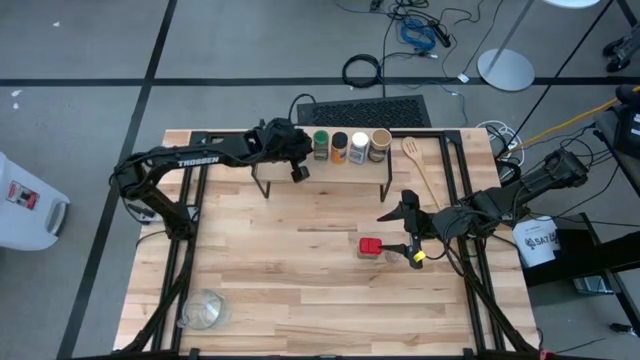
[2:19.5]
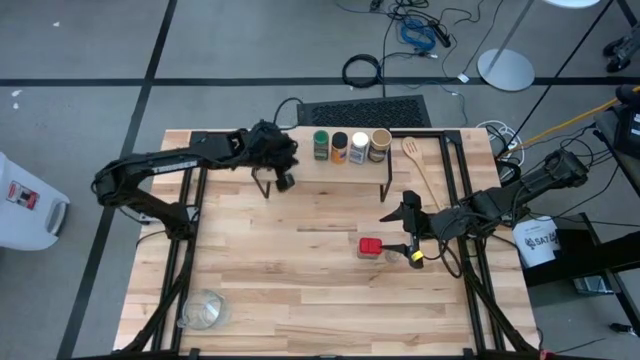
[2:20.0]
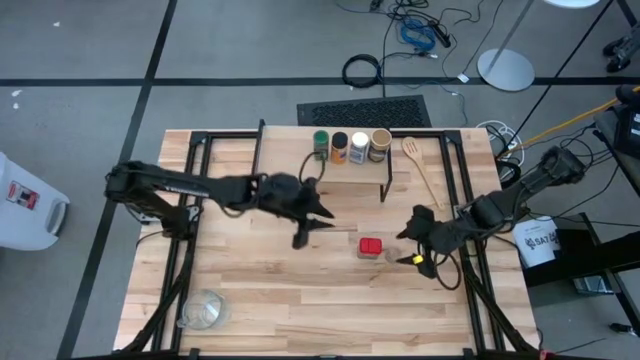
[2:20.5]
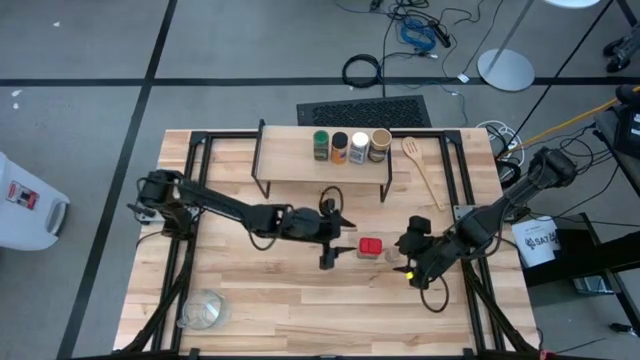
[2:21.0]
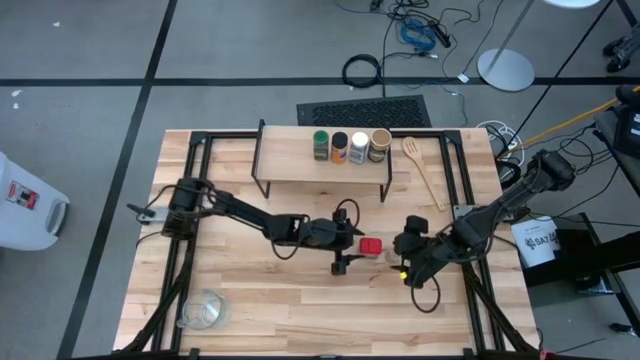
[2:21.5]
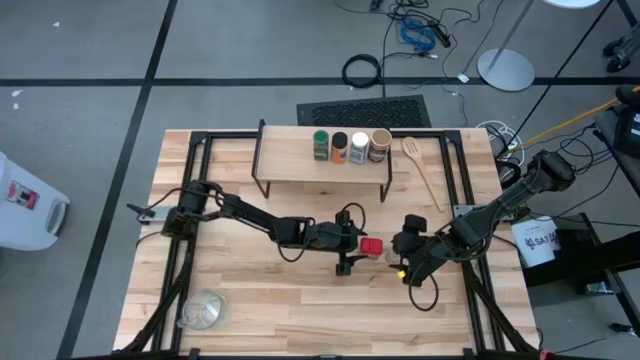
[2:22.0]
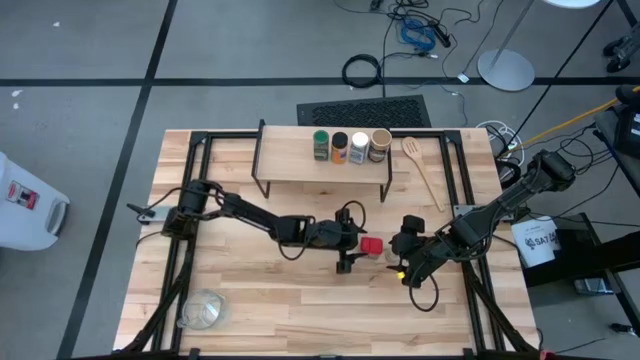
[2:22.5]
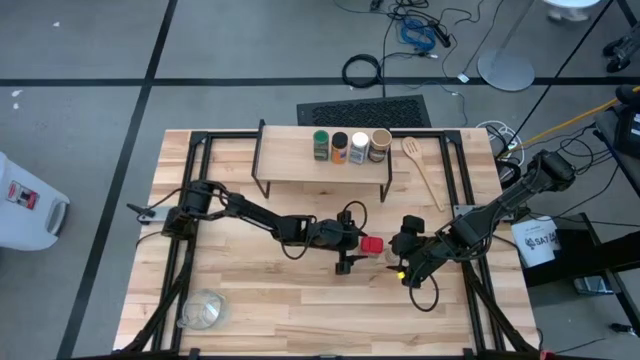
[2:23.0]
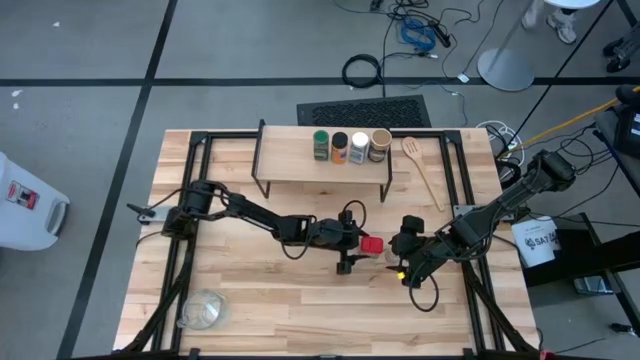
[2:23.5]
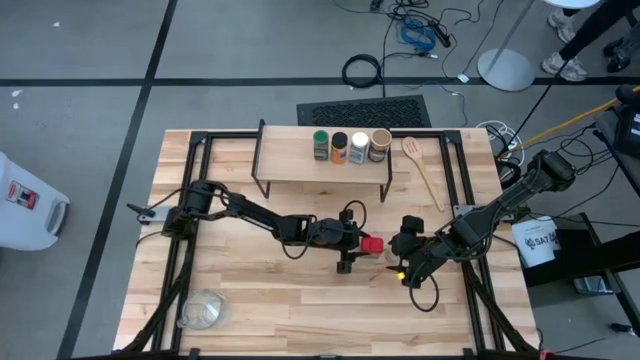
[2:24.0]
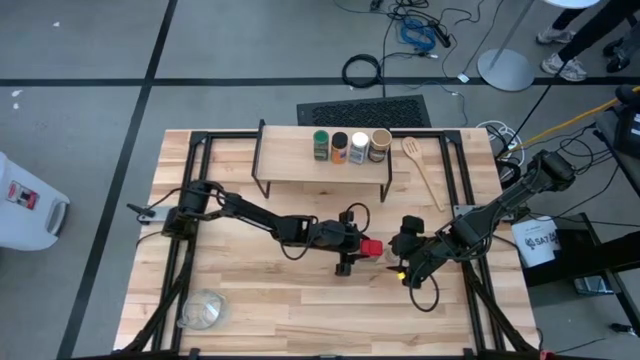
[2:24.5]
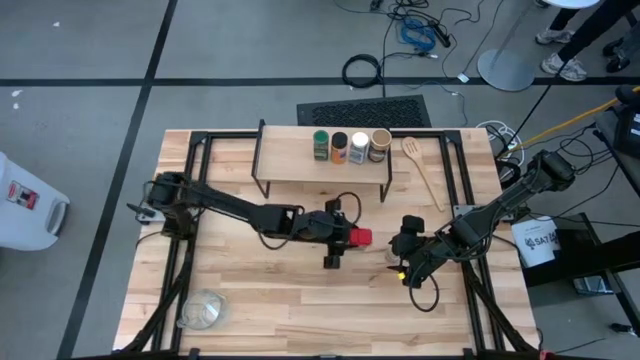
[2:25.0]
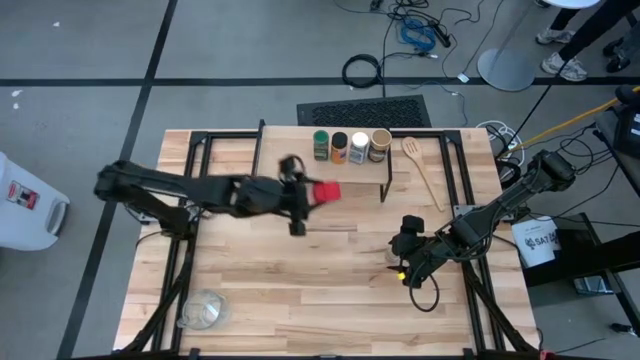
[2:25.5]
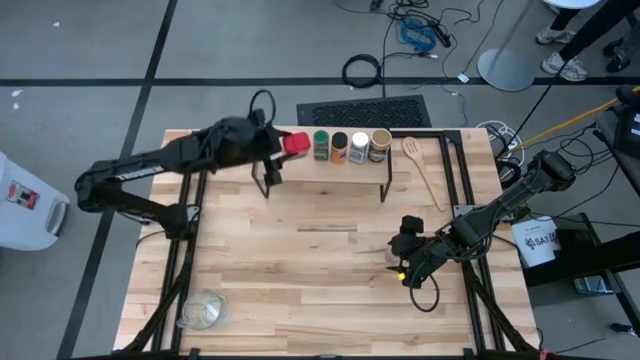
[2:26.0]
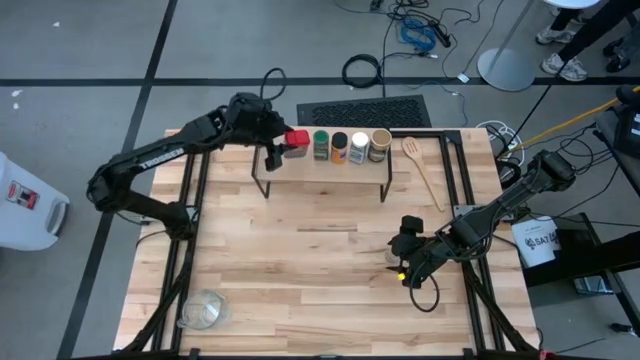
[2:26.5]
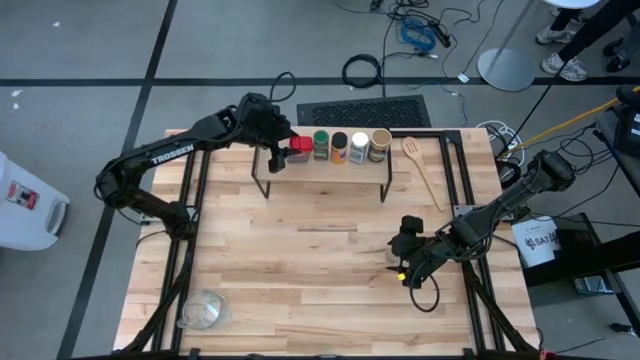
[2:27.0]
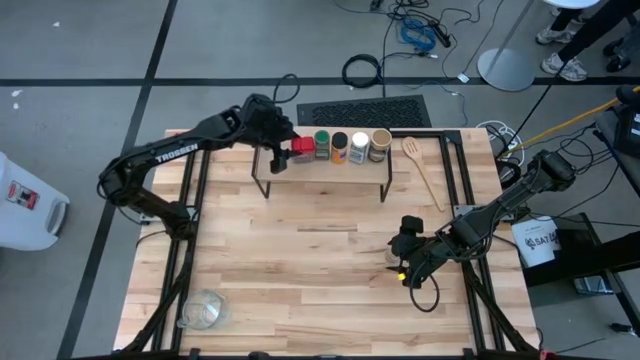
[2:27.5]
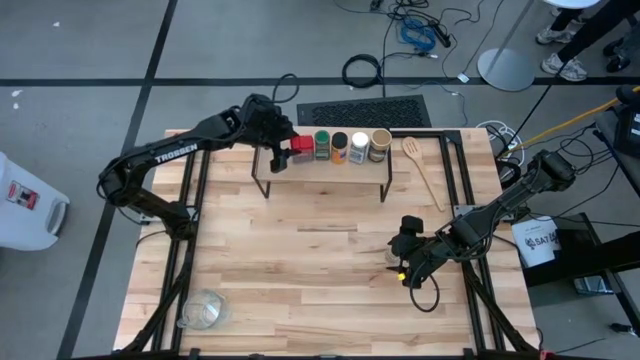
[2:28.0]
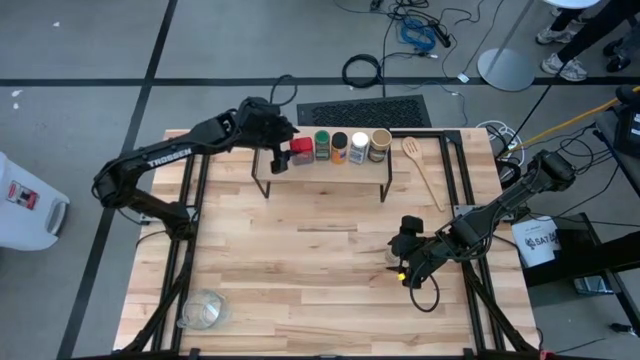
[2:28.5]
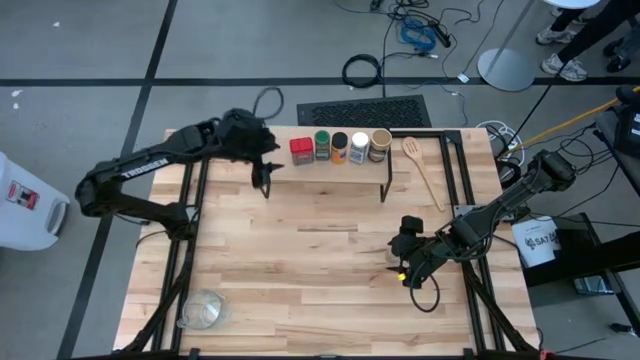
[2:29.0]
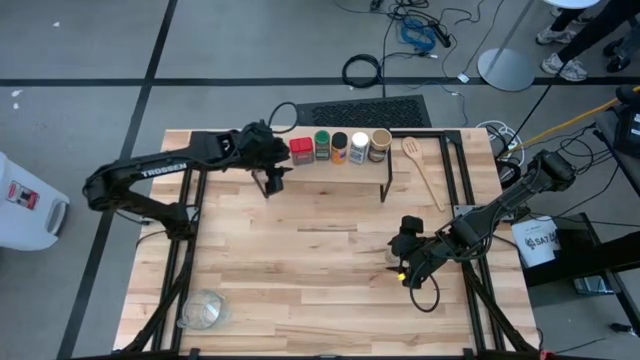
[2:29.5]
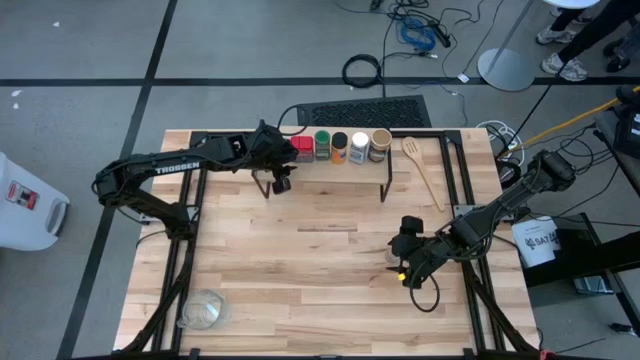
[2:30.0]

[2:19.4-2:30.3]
Task: Shelf spices
Put the red seasoning can on the shelf

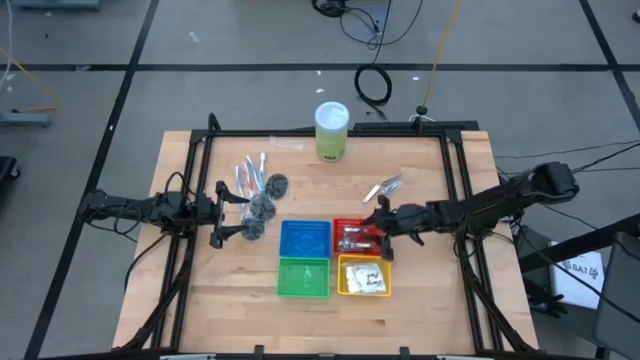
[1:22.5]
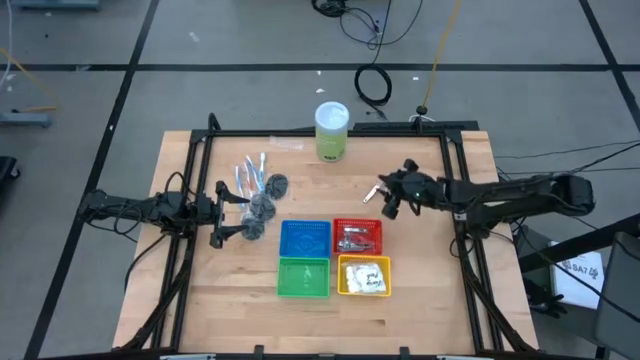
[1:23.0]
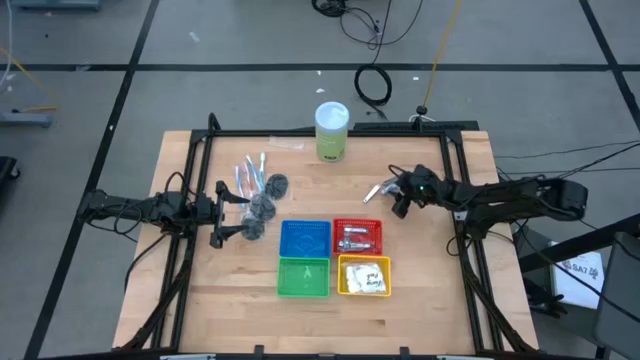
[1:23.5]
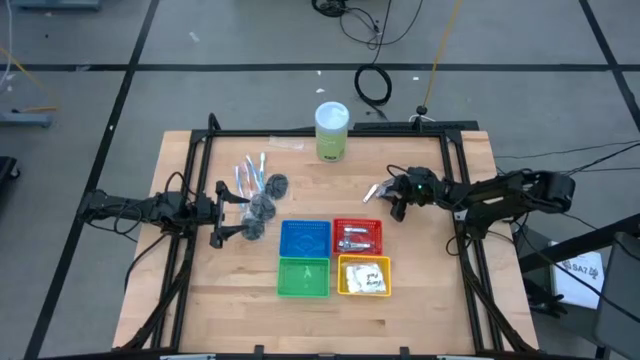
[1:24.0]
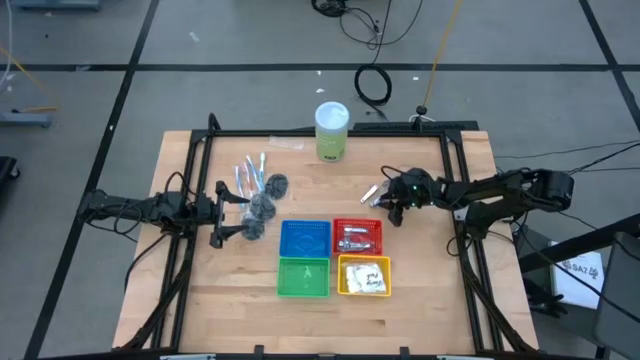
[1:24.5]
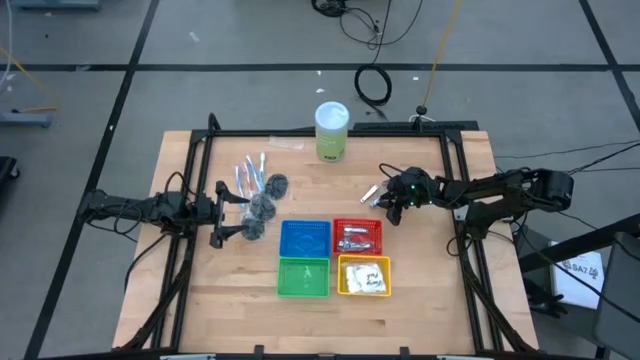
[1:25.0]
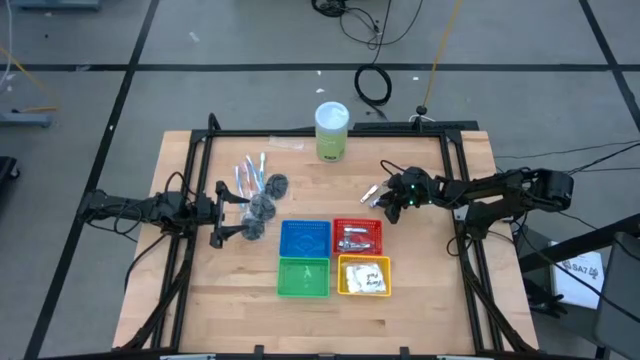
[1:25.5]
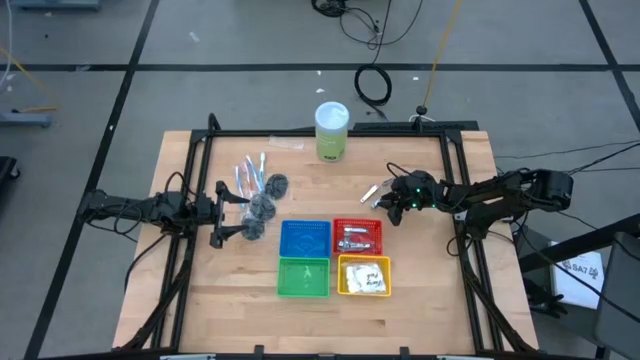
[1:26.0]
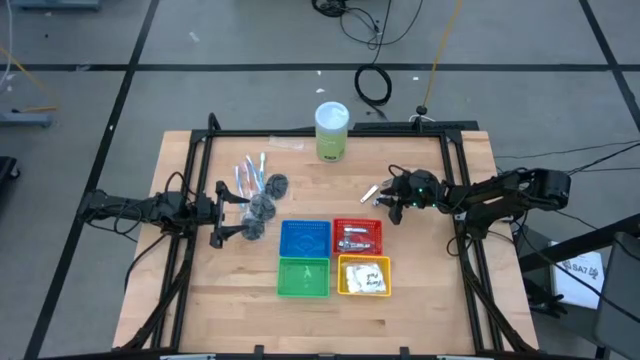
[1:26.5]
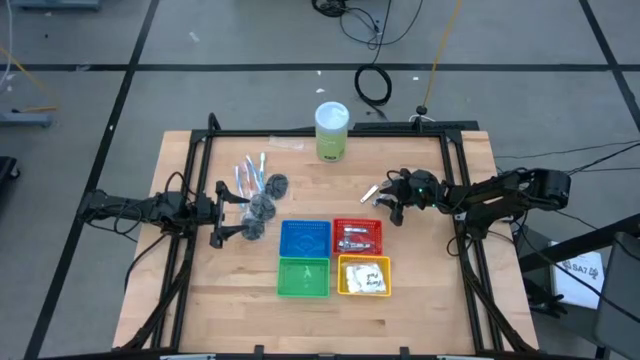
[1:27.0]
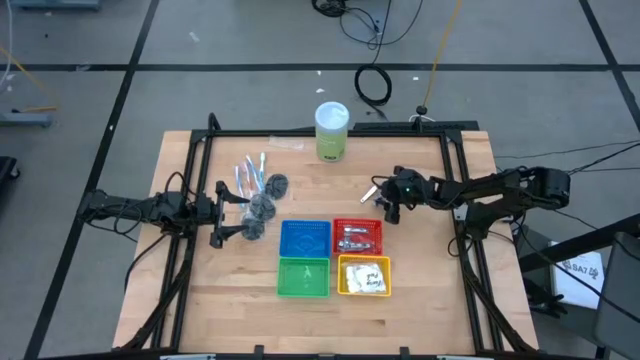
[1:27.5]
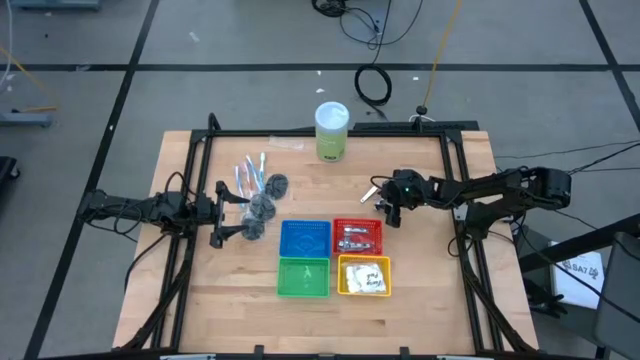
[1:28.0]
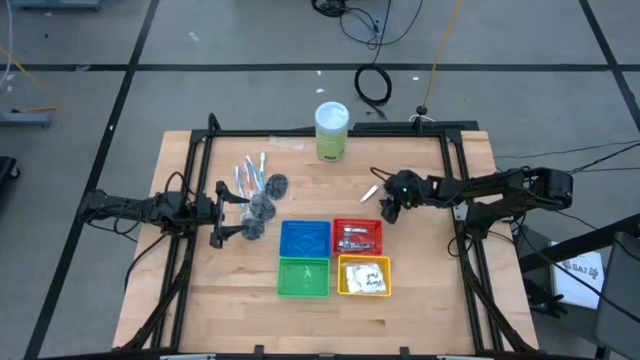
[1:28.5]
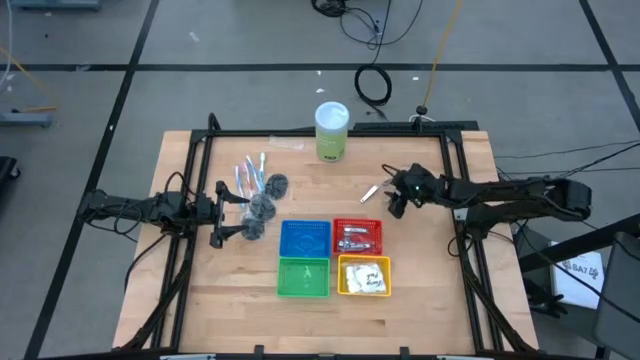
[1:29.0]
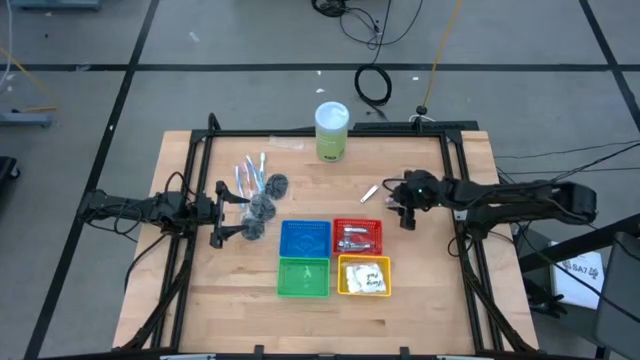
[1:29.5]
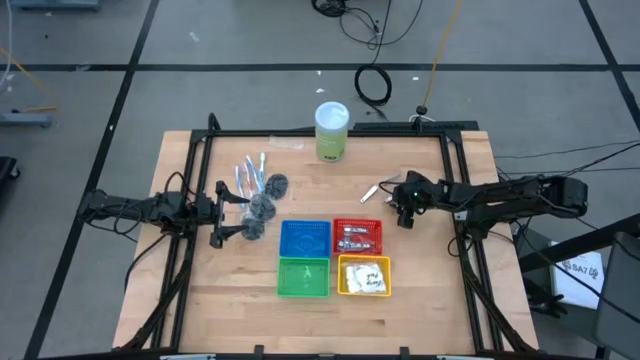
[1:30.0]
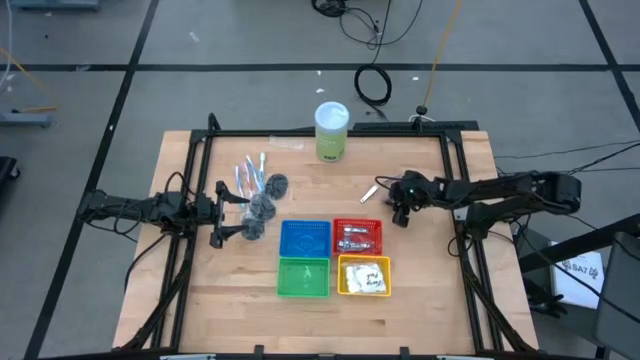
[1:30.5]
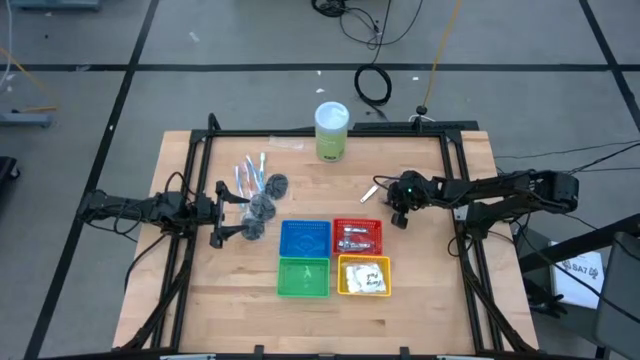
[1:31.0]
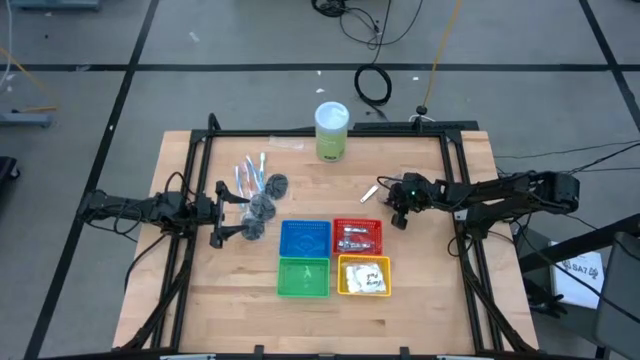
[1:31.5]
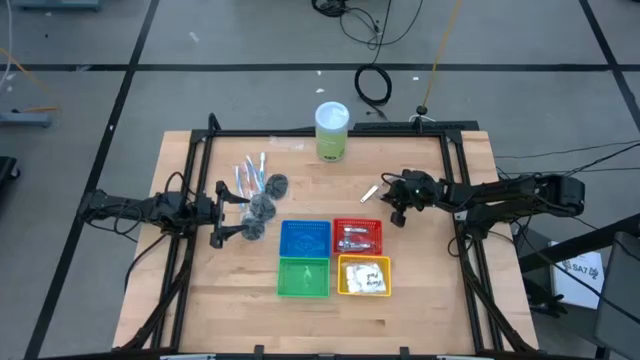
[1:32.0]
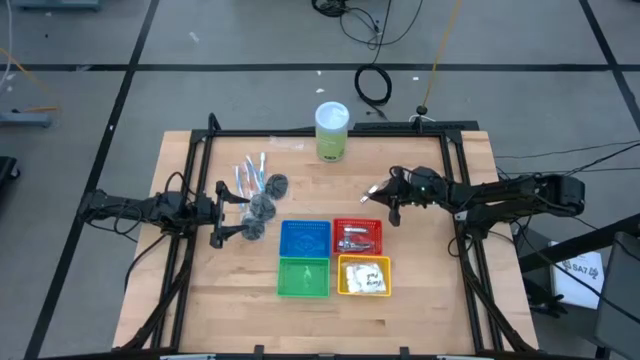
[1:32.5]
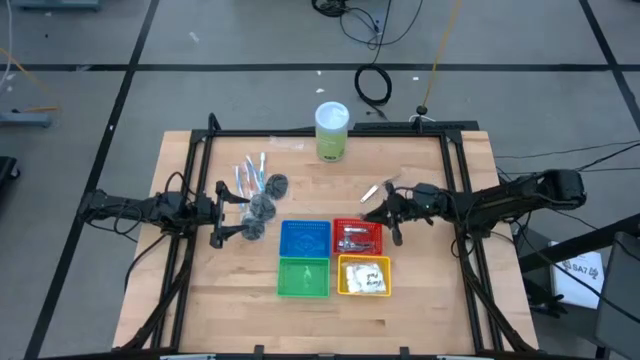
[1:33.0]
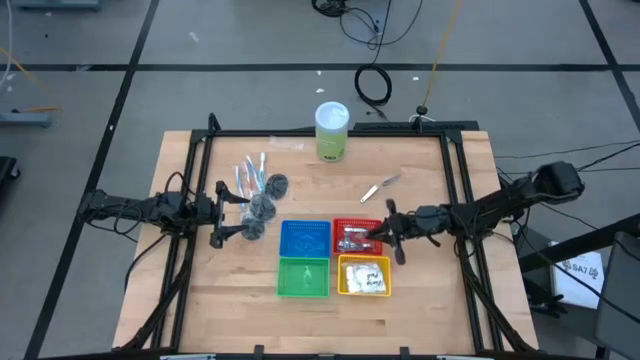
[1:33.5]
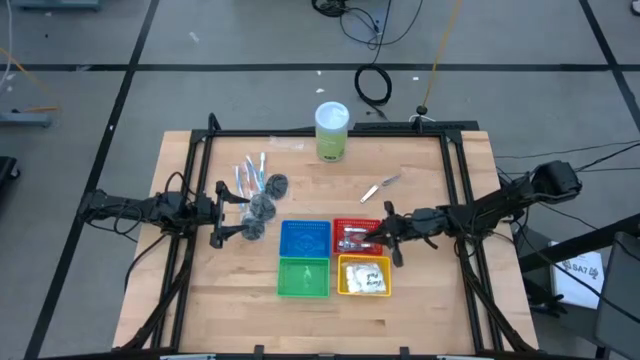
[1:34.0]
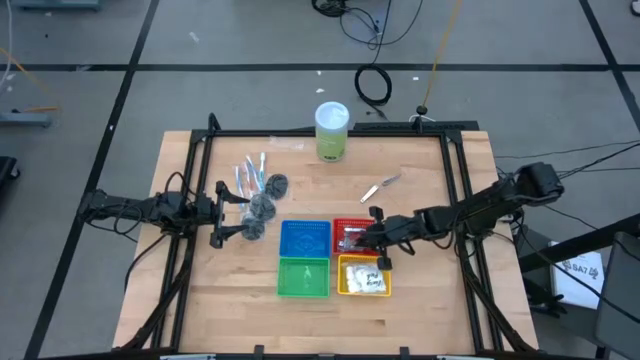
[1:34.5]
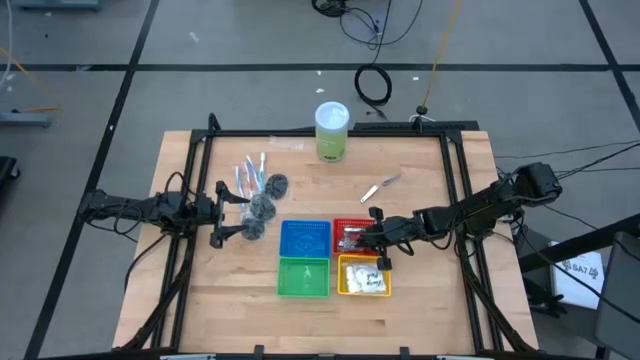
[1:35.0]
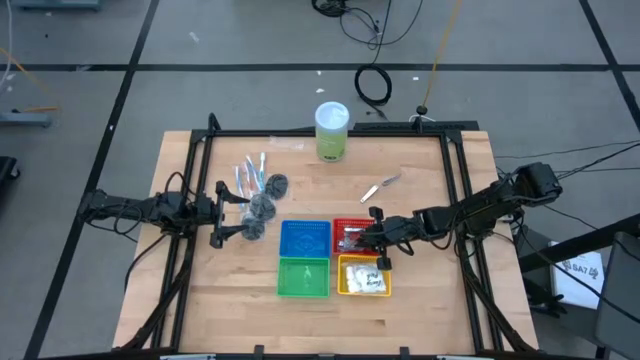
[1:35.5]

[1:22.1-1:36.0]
Task: Pick & Place Travel size toiletries
Put the nail cutter into the red basket
